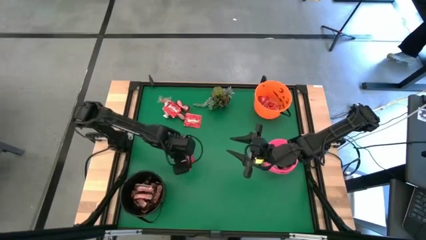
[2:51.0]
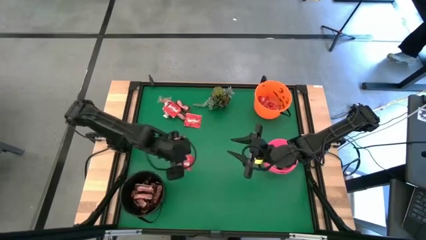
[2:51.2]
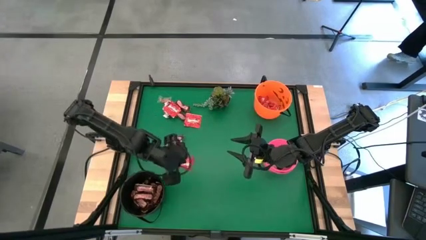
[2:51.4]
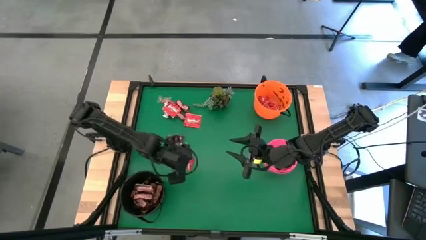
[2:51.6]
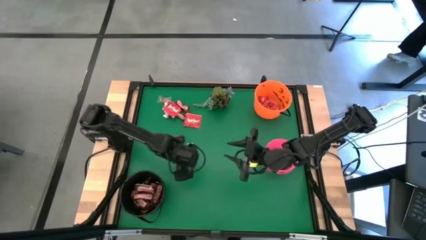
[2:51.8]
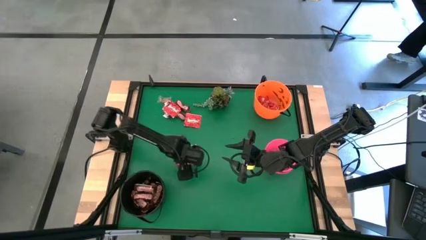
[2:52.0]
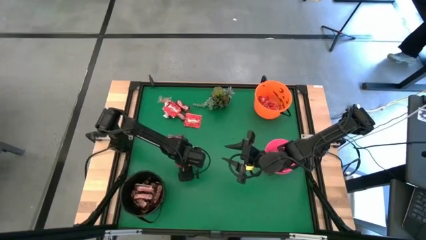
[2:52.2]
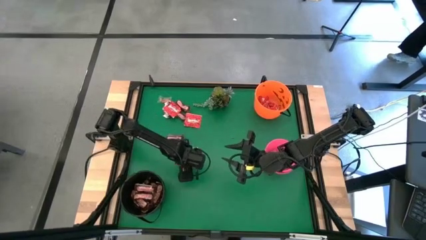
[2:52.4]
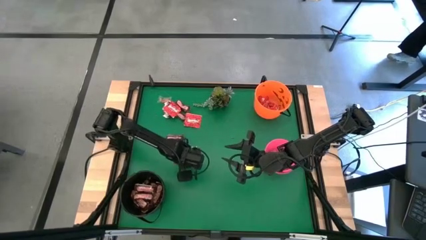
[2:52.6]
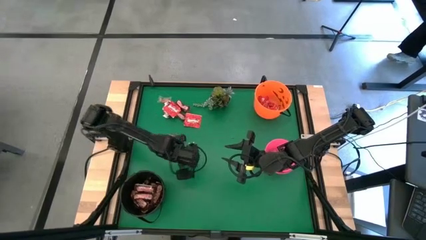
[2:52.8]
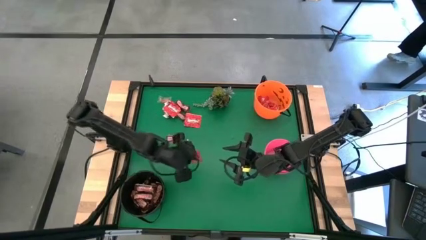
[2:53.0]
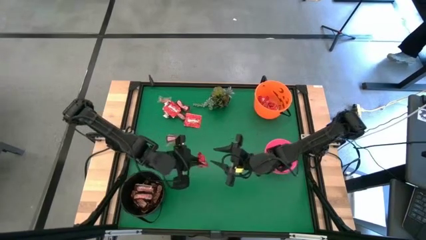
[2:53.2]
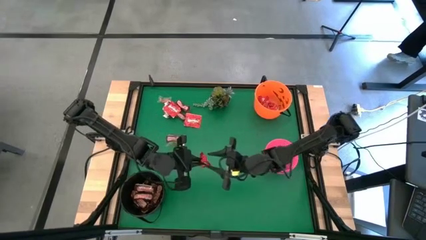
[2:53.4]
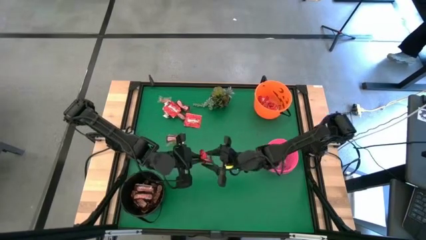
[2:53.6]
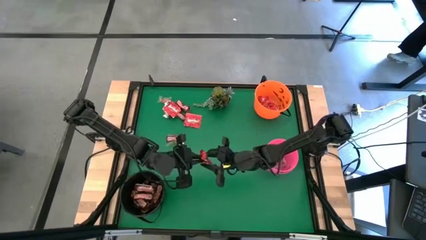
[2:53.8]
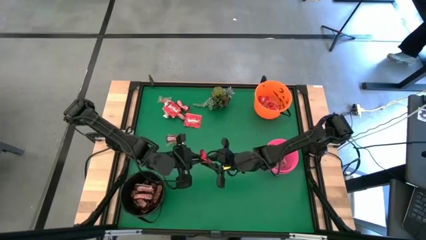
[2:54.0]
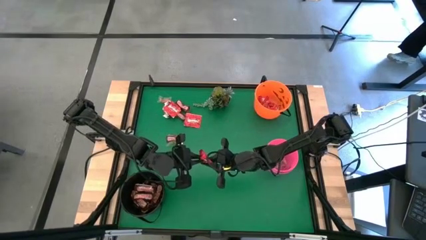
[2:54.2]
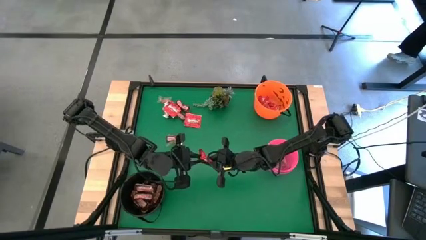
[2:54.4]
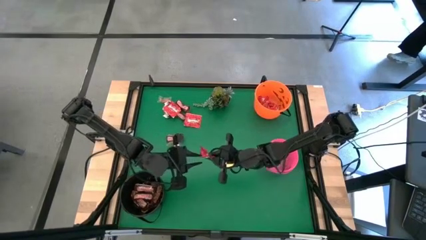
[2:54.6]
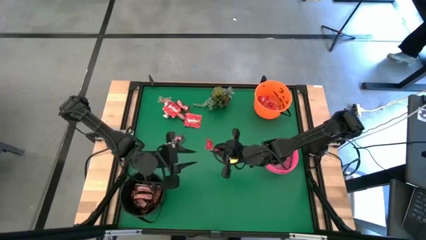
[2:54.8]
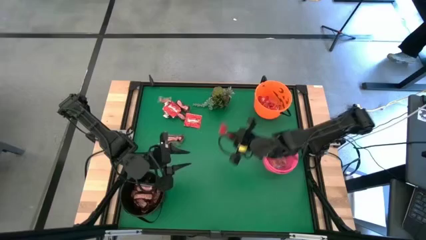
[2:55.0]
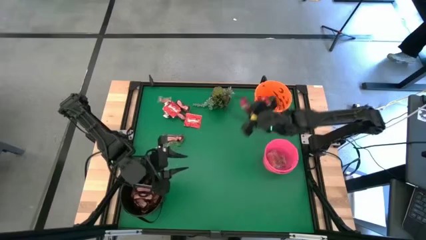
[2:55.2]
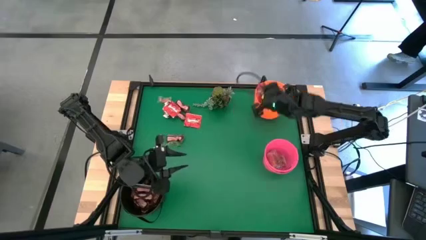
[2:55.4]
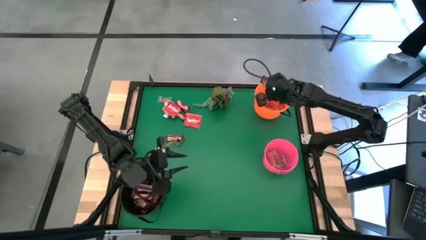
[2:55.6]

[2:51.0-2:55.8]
Task: Sort candy
Put the red candy into the orange bucket

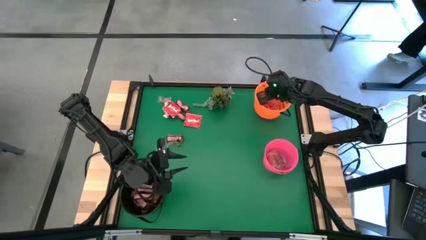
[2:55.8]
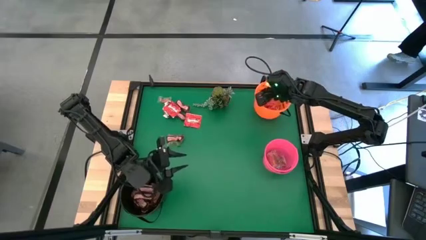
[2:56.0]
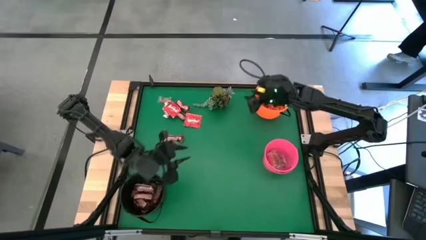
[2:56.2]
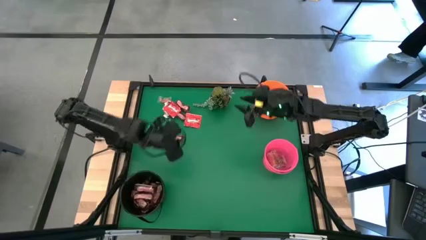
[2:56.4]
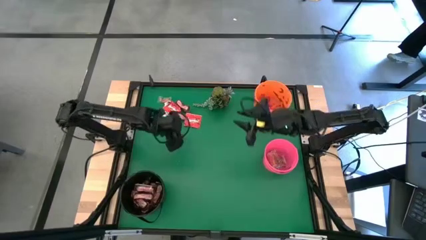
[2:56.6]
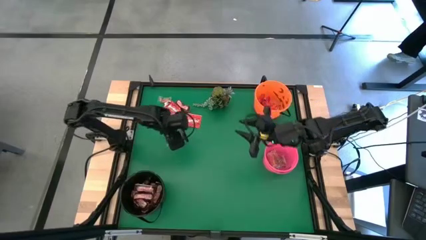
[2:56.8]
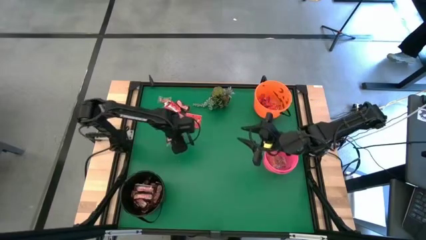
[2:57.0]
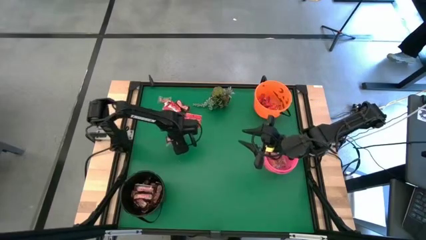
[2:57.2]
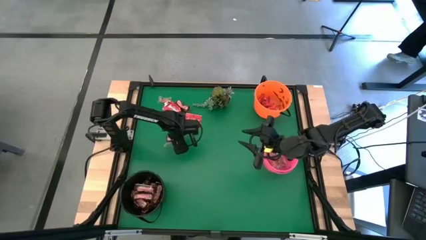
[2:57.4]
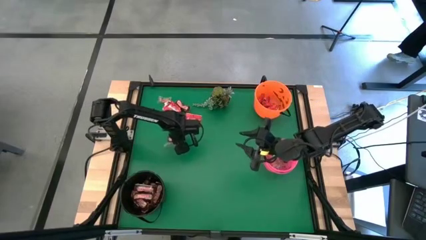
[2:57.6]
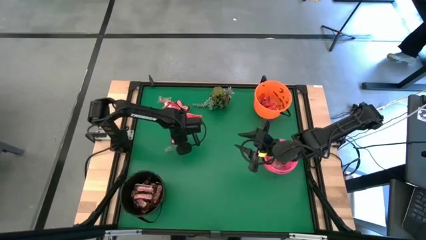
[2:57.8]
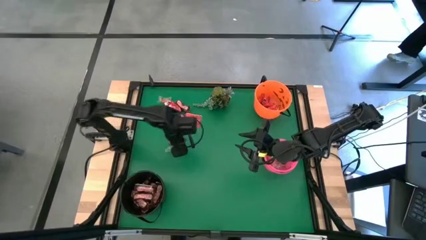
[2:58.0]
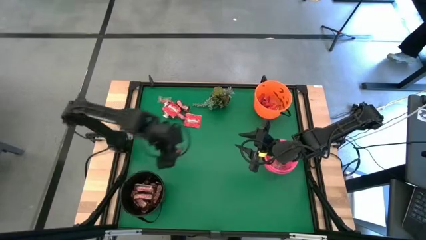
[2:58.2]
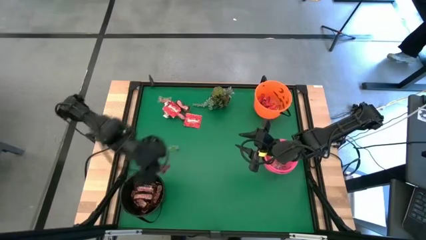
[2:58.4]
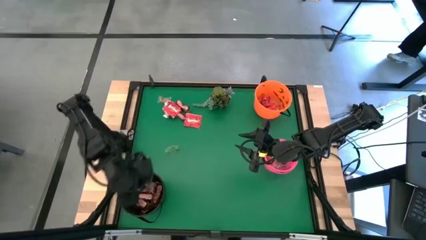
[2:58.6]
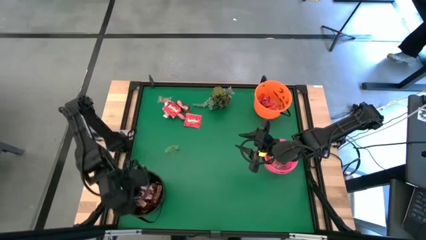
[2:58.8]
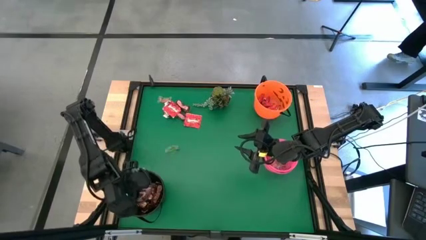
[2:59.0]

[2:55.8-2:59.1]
Put the brown chocolate bar into the black bucket

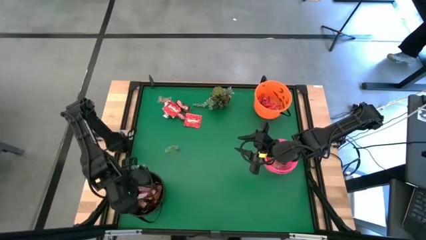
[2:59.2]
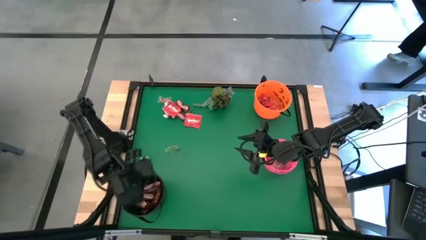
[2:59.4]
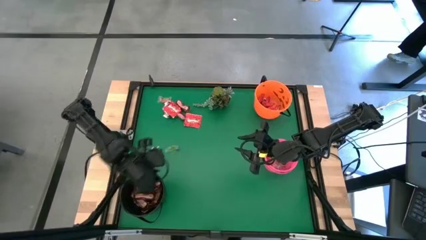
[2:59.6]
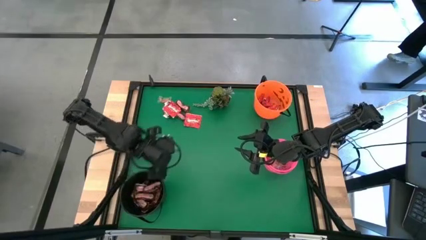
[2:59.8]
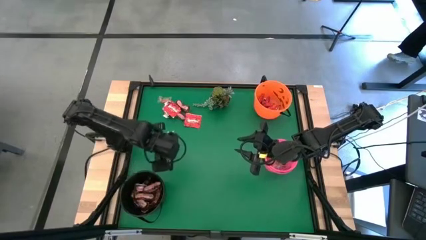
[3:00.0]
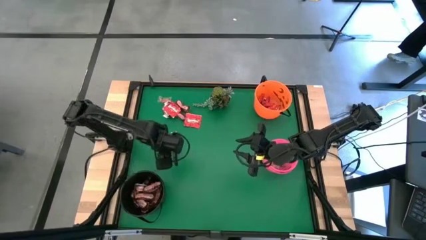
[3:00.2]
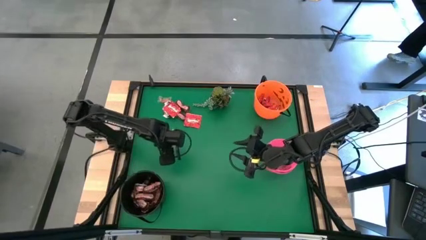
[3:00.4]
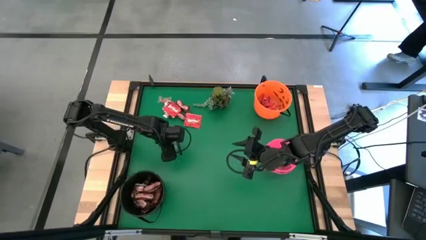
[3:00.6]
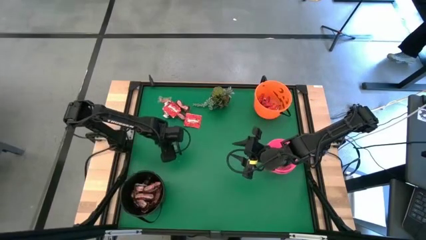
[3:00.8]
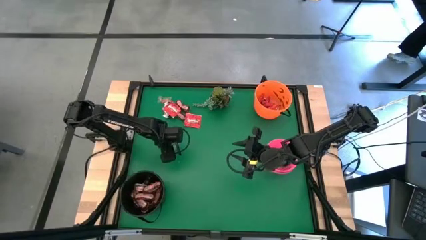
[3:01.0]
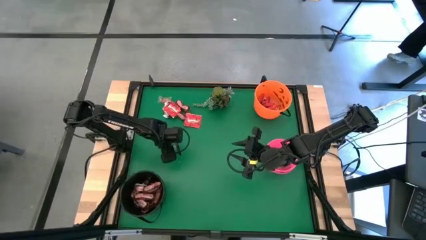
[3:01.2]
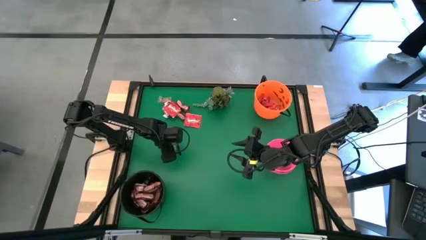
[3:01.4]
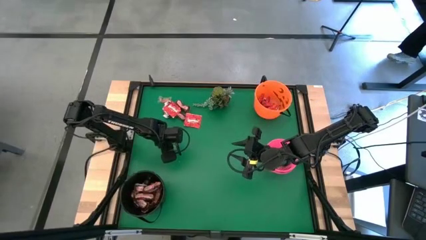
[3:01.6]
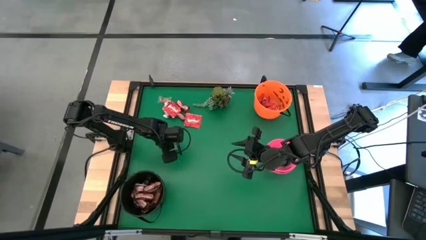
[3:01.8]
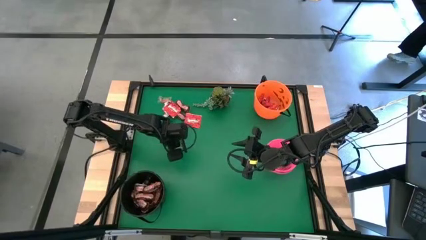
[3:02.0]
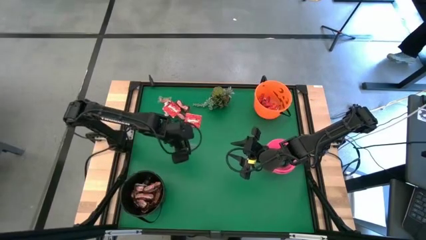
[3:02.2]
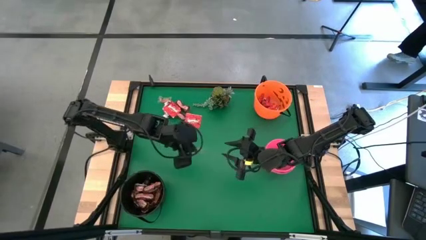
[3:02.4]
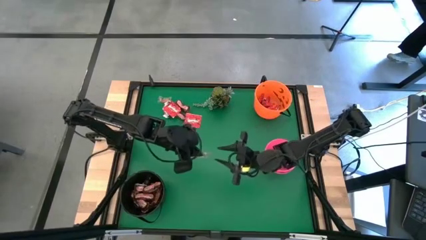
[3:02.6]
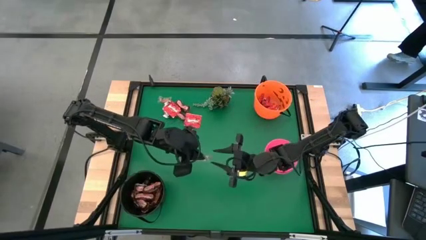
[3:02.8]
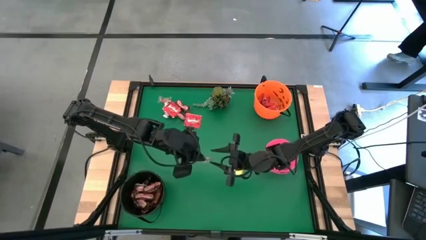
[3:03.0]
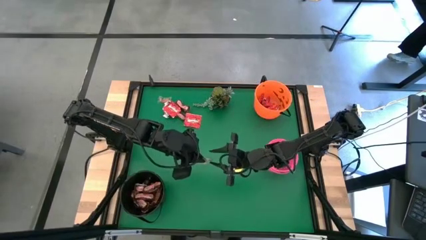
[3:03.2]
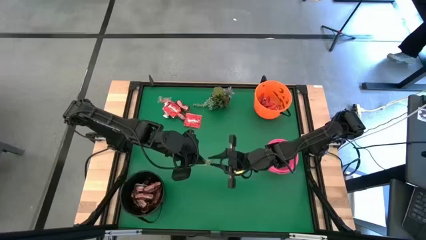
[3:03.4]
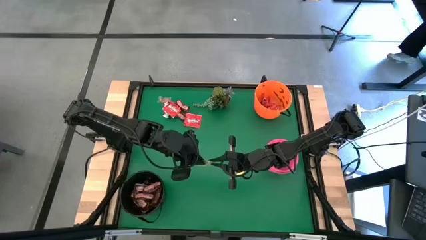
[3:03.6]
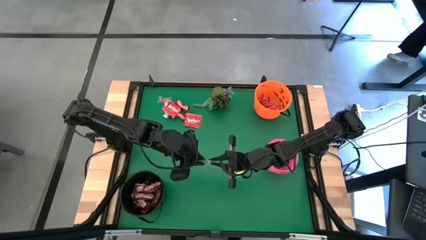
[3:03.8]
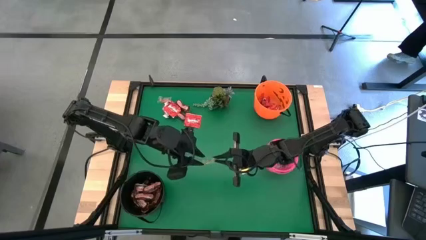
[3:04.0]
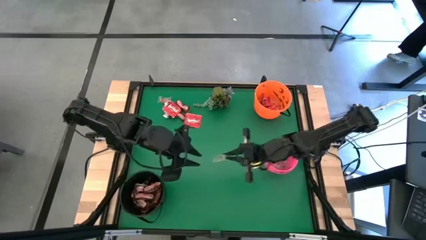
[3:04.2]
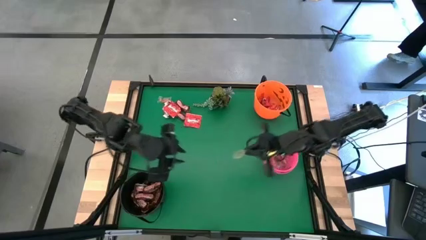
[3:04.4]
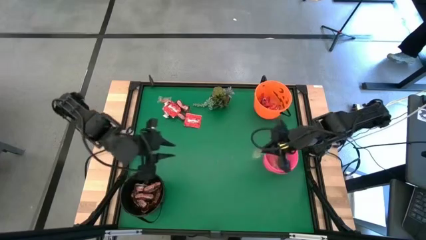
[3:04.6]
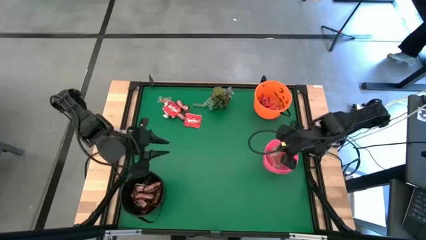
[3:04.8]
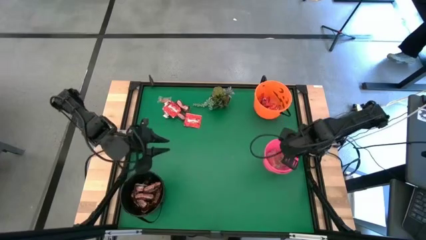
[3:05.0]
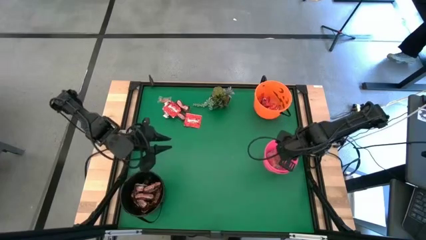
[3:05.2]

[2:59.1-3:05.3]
Put the green candy into the pink bucket

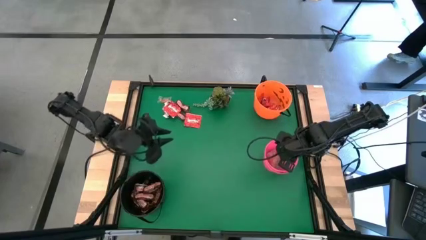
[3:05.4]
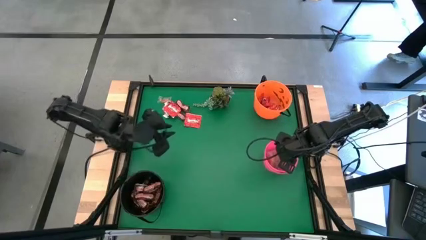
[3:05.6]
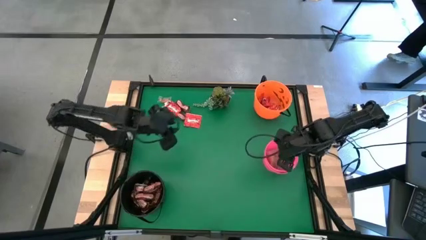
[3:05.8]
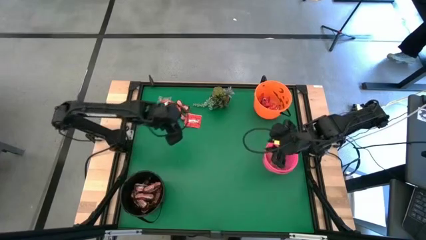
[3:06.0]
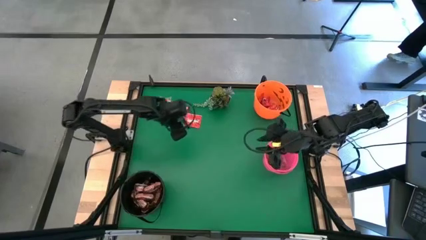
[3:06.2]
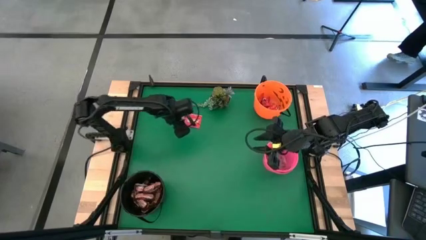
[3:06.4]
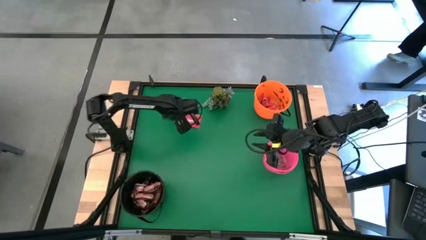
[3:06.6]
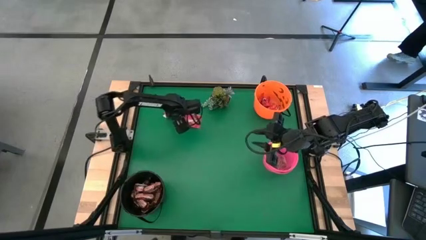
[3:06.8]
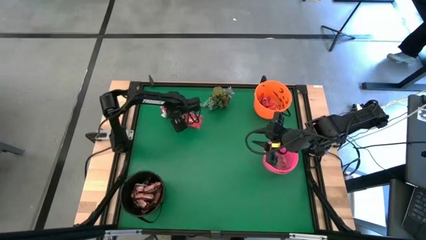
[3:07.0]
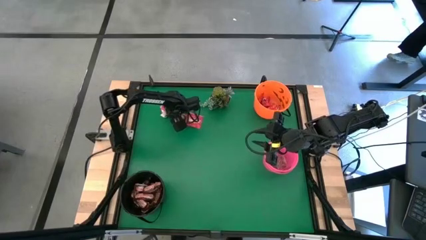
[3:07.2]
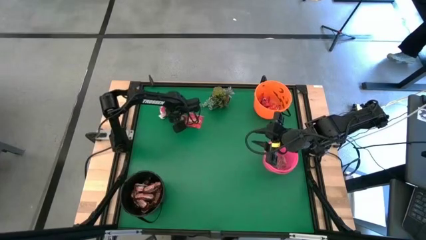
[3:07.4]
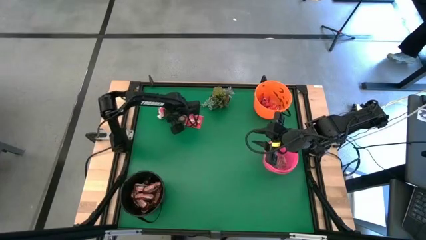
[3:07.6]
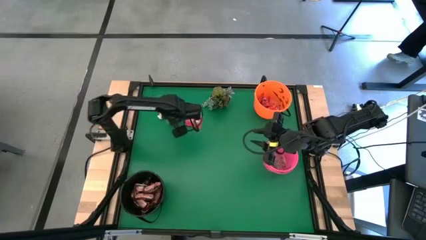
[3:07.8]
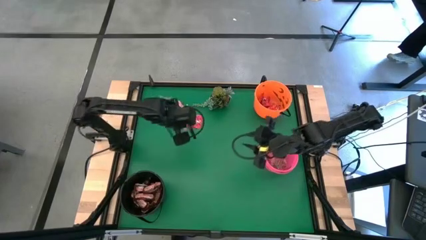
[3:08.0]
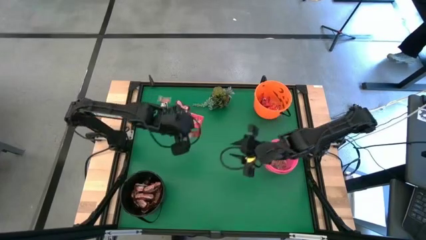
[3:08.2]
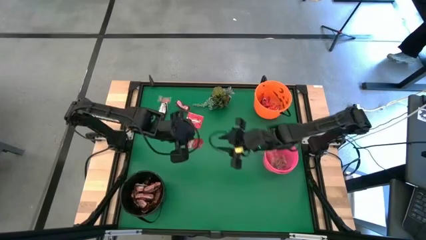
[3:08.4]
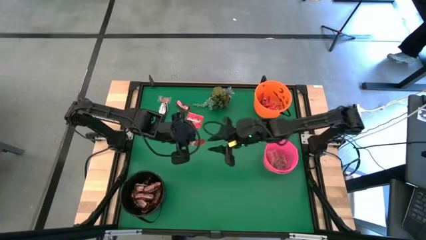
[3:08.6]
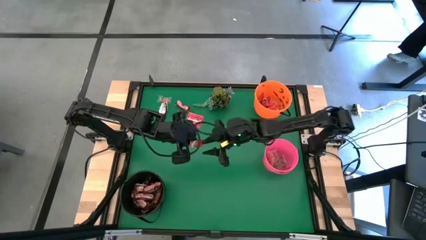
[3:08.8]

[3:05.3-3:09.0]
Put the red candy into the orange bucket
